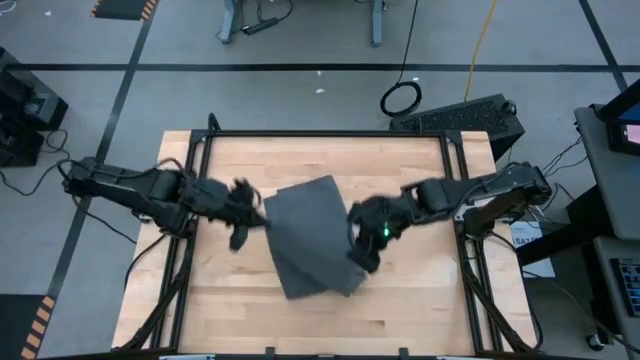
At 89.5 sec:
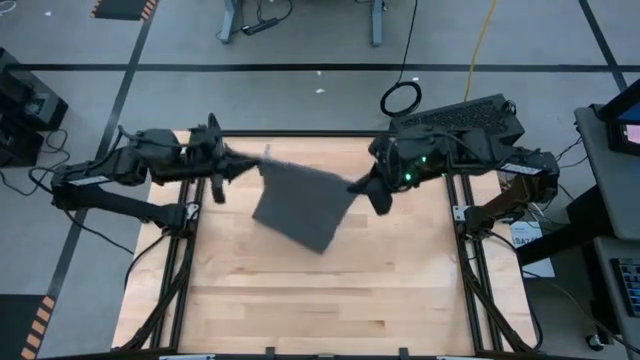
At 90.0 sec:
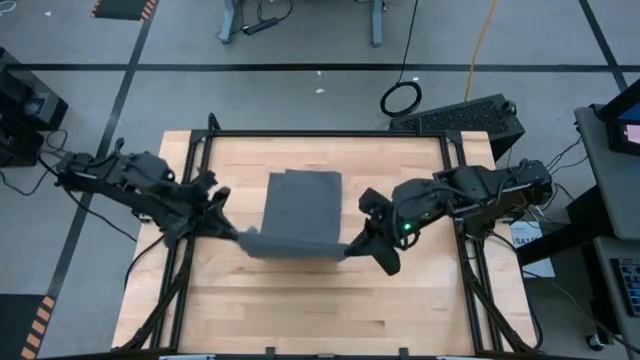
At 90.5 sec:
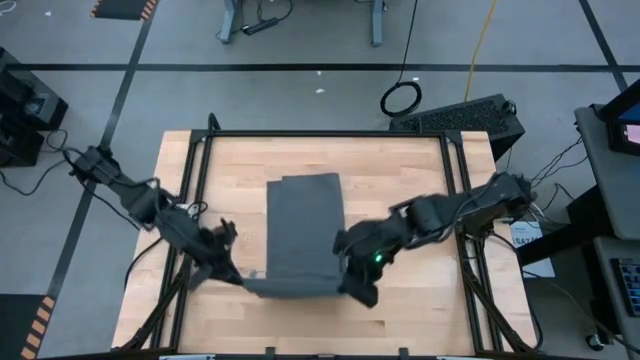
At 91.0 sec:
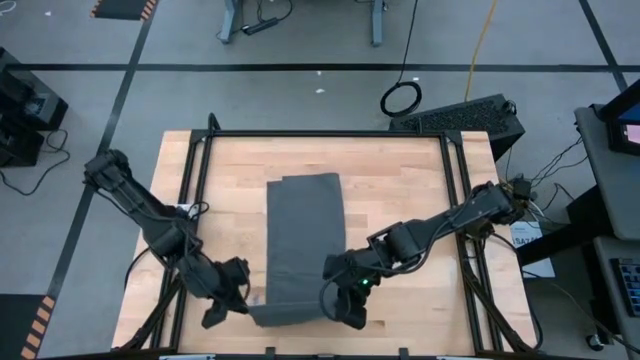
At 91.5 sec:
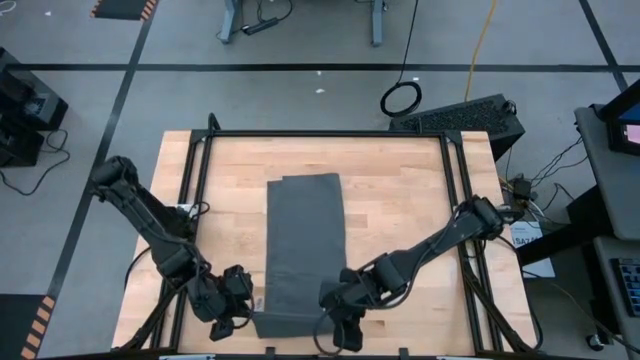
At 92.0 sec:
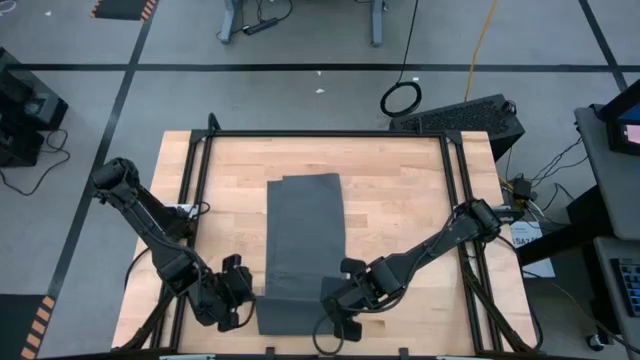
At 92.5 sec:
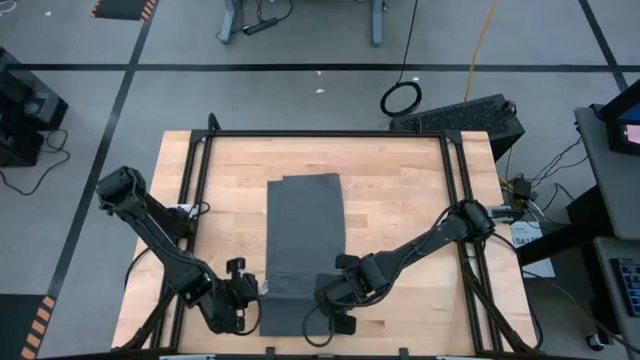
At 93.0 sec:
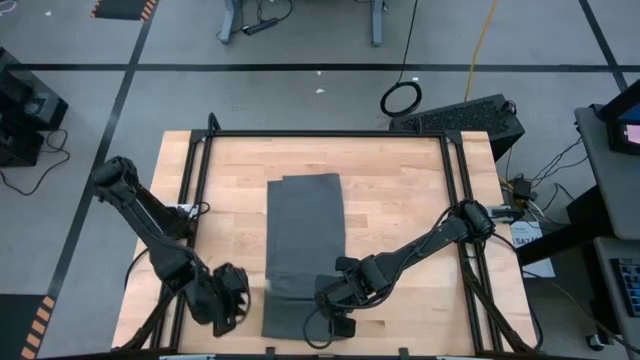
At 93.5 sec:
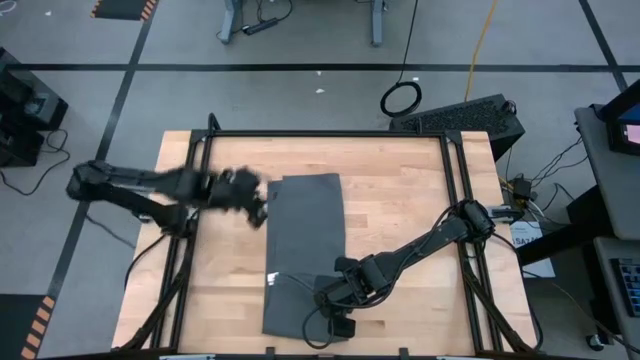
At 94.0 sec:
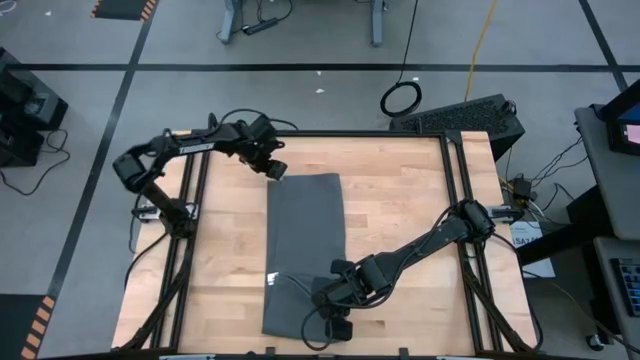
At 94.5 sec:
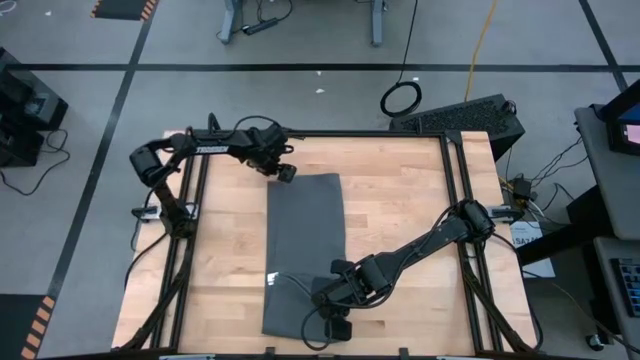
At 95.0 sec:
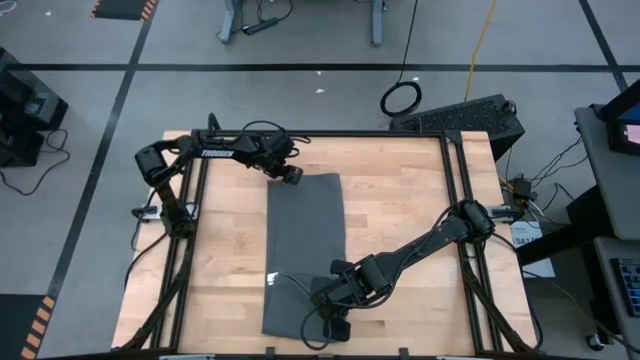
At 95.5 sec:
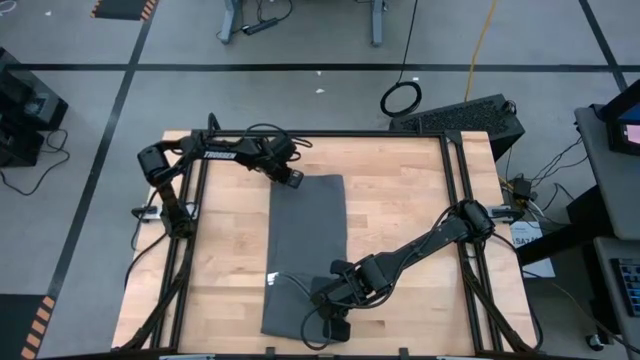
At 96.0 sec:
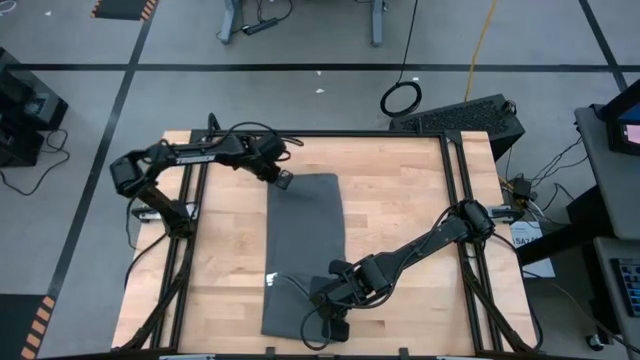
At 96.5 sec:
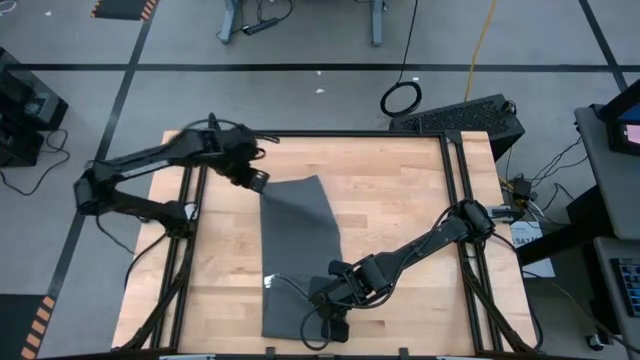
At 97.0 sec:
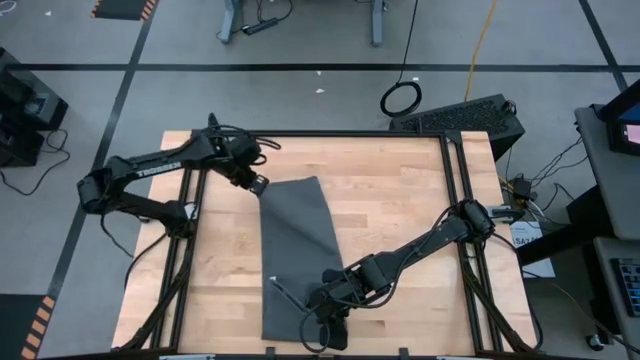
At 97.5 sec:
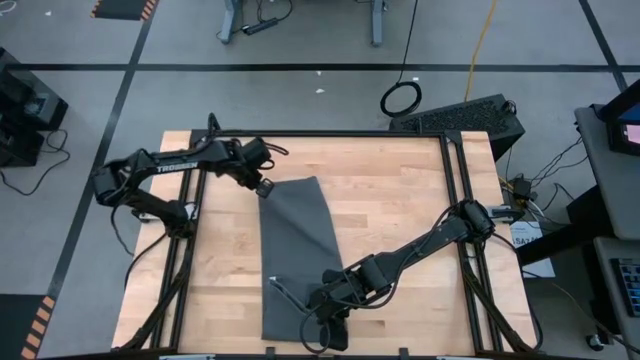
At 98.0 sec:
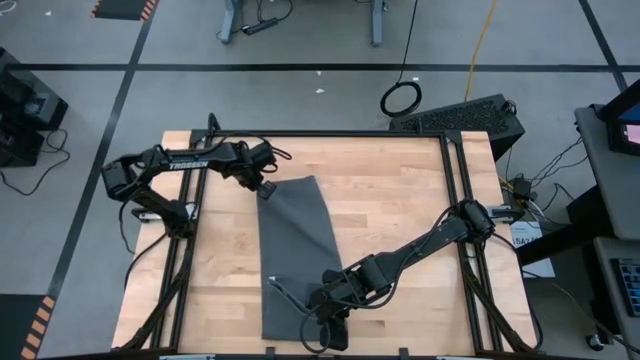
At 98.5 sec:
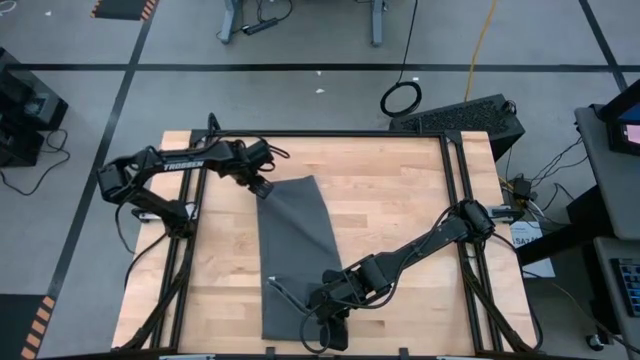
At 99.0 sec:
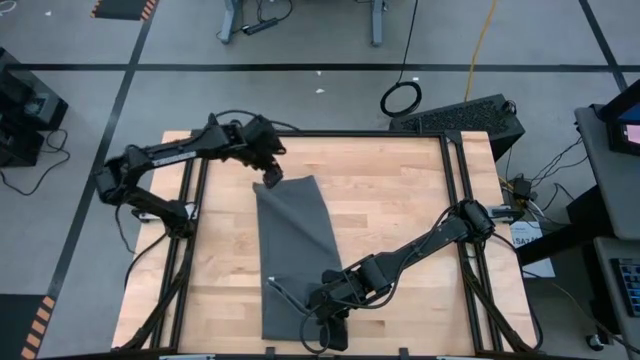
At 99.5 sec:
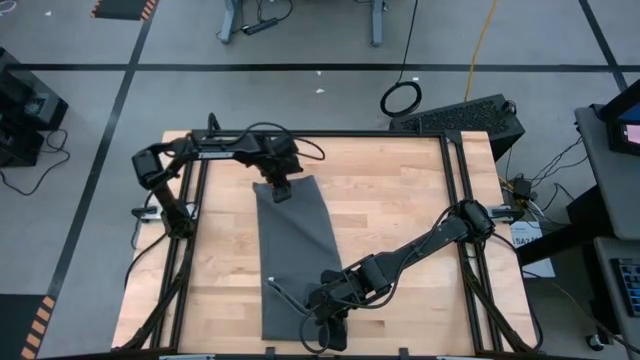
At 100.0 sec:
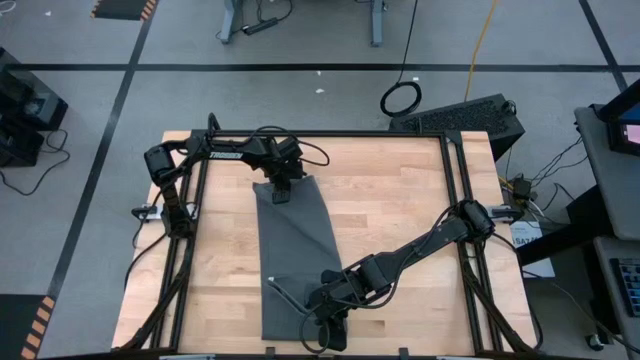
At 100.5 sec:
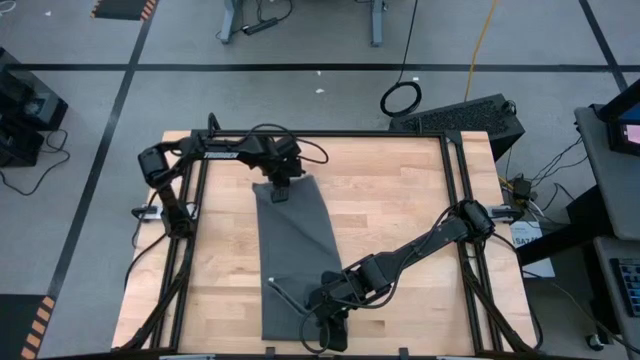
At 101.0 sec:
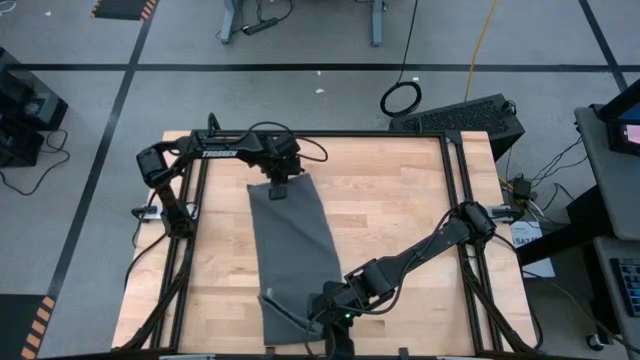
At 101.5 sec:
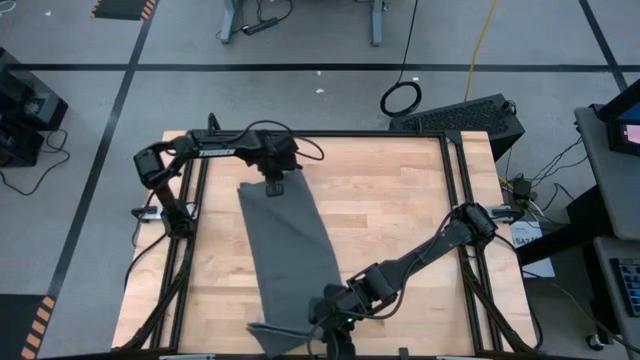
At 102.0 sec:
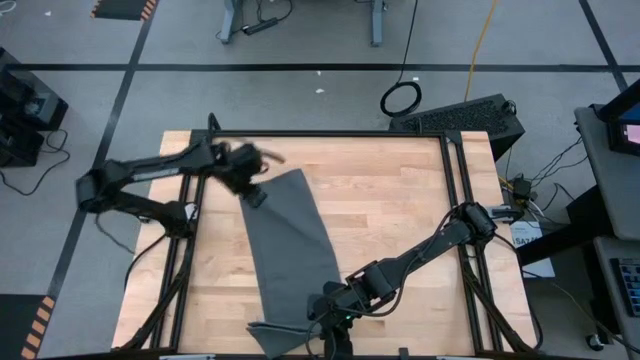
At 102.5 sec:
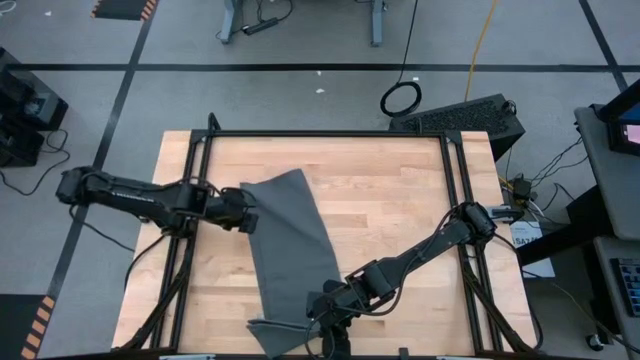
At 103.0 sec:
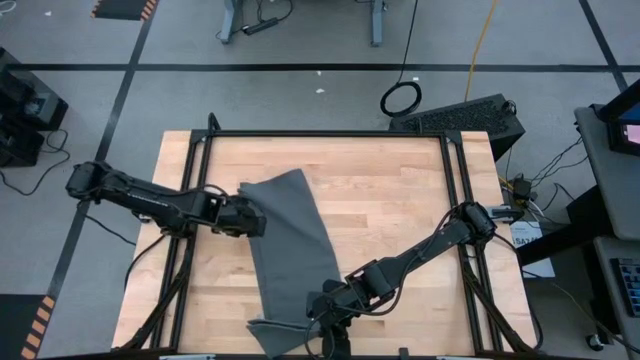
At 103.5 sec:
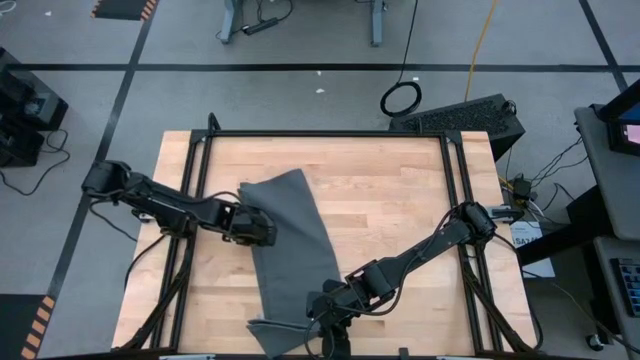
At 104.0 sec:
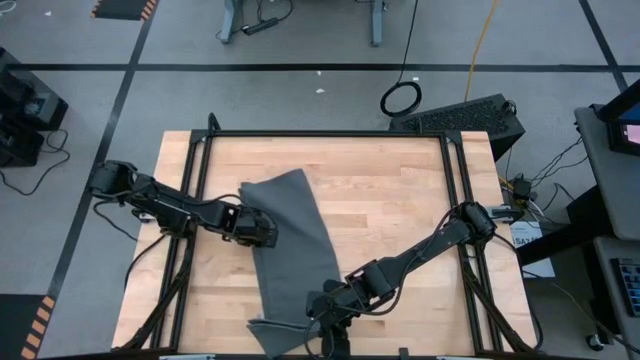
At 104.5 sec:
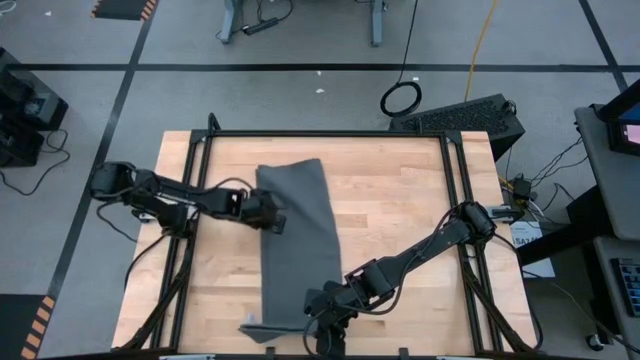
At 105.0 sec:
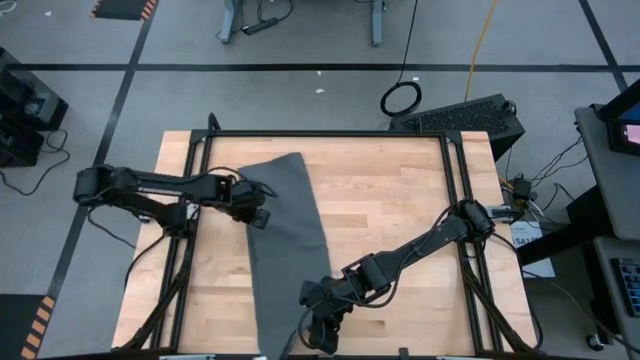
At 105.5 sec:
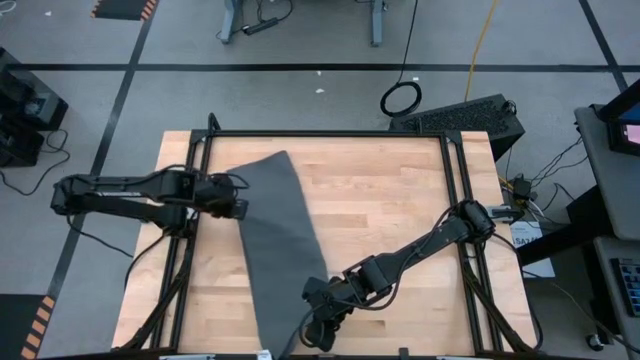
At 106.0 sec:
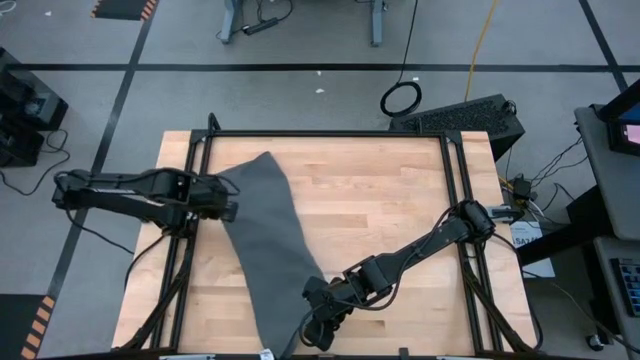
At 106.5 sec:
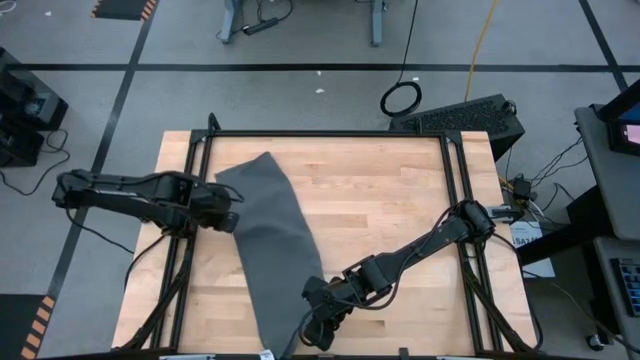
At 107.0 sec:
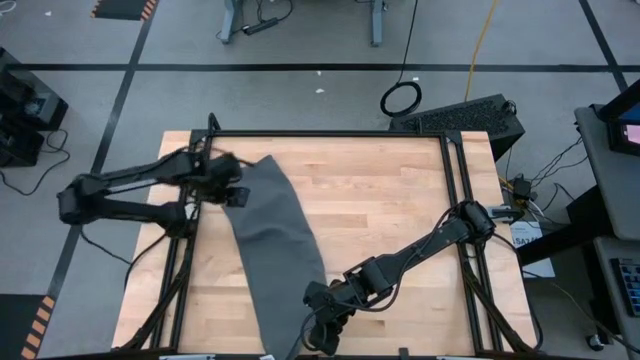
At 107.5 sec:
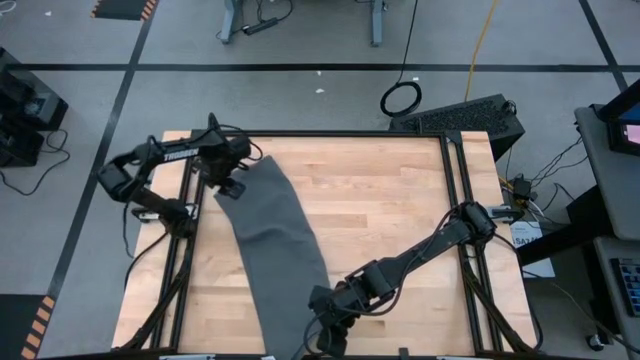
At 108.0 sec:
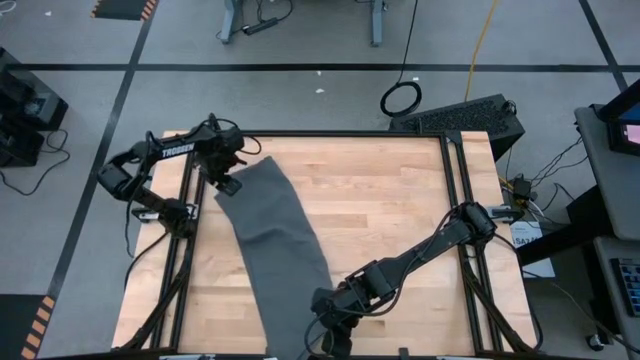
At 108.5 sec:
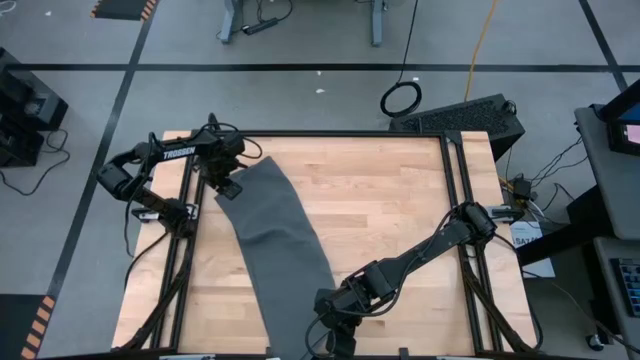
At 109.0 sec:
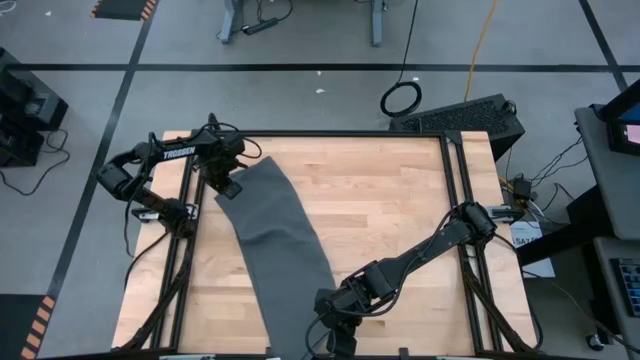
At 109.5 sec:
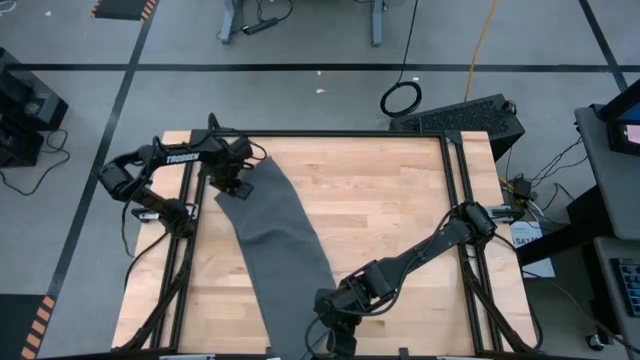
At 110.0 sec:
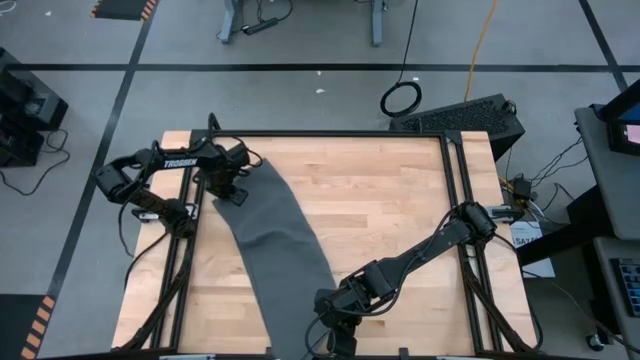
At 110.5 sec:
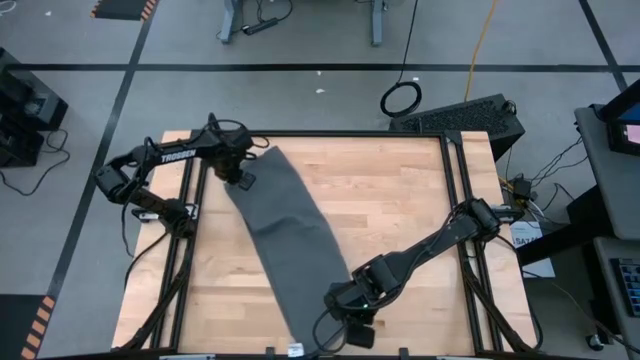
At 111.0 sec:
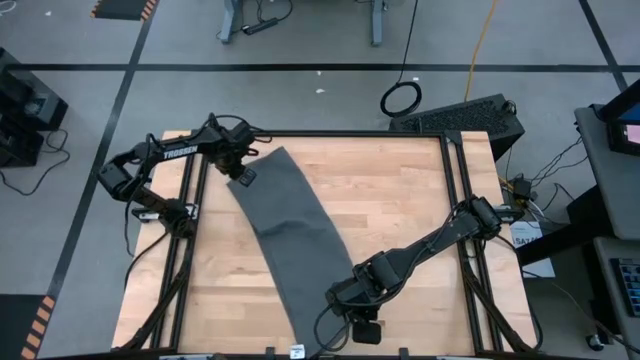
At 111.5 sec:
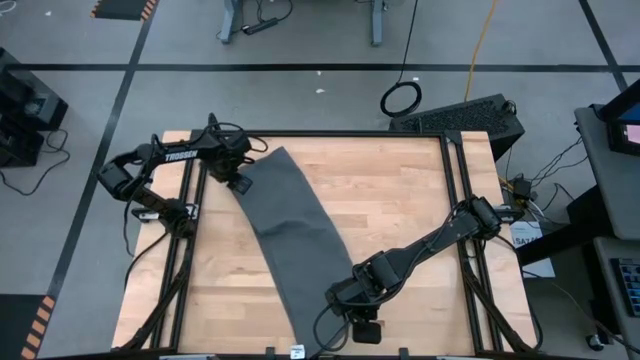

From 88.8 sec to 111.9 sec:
Task: Roll towel into tight, uniform cylinder
Roll the gray towel
